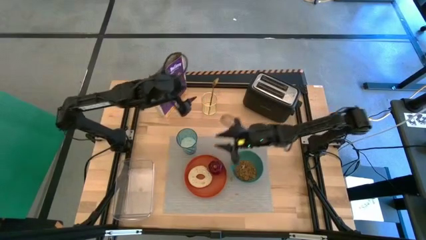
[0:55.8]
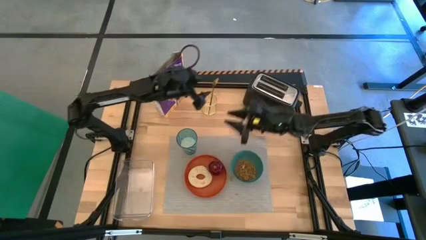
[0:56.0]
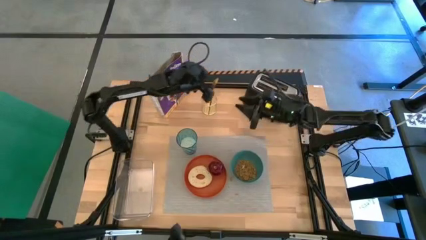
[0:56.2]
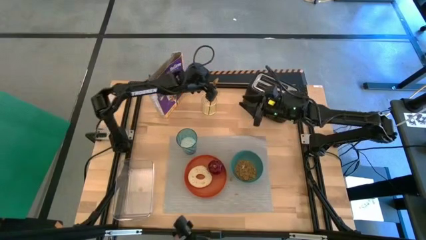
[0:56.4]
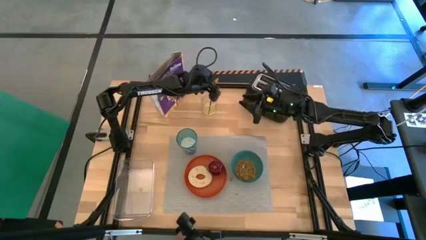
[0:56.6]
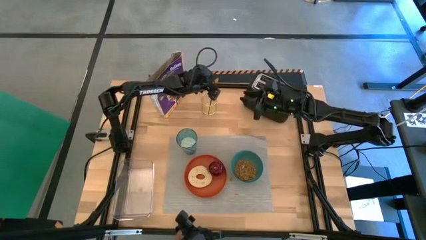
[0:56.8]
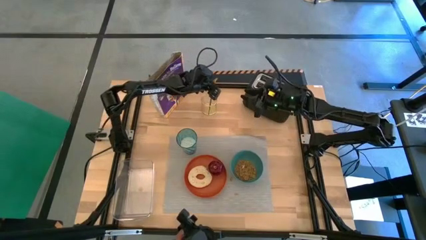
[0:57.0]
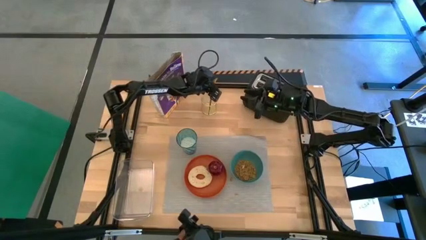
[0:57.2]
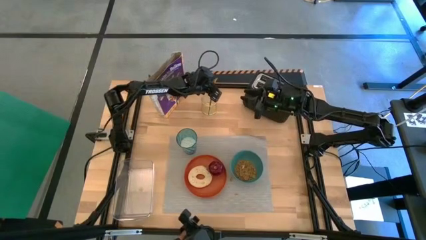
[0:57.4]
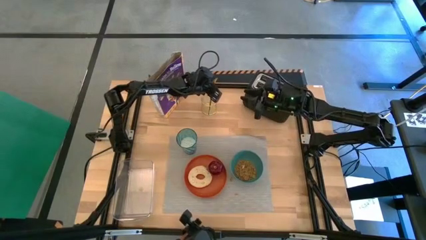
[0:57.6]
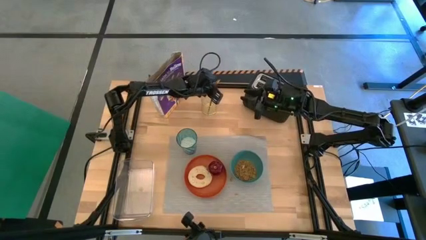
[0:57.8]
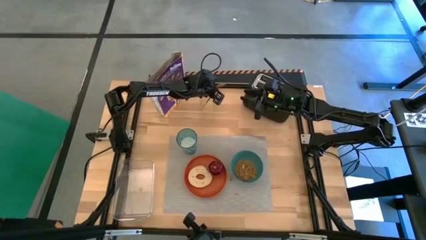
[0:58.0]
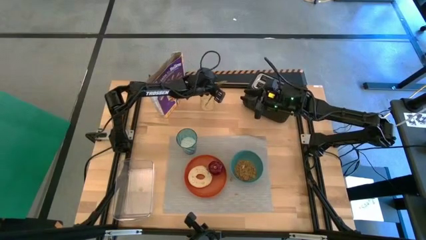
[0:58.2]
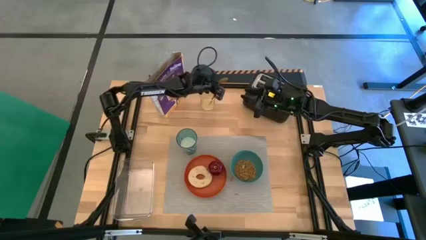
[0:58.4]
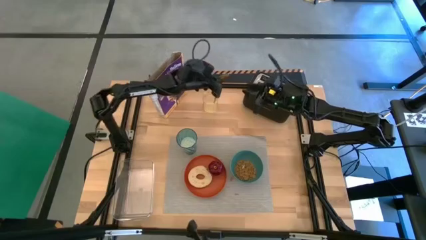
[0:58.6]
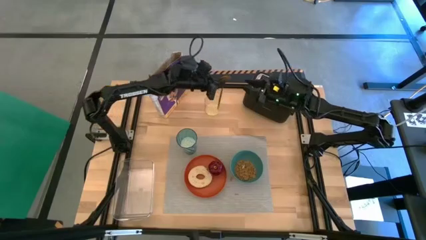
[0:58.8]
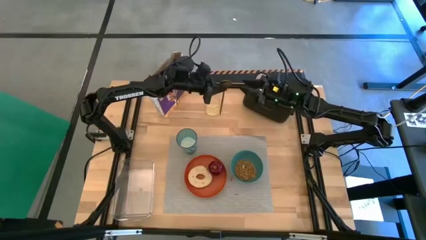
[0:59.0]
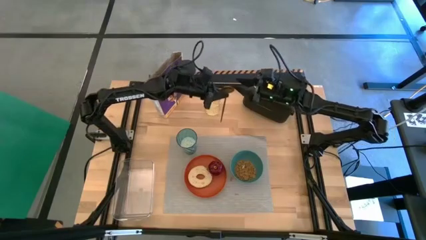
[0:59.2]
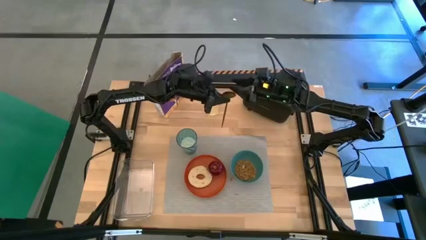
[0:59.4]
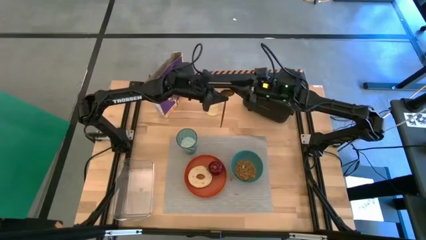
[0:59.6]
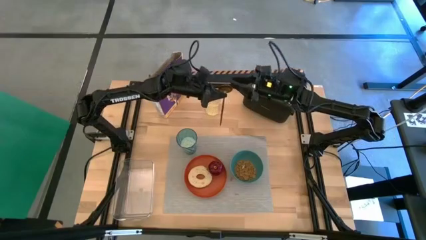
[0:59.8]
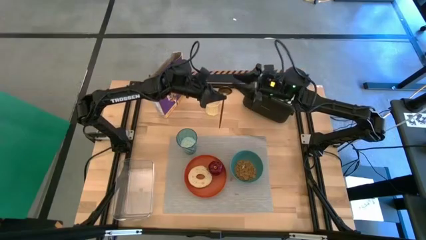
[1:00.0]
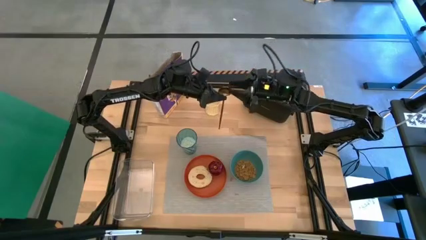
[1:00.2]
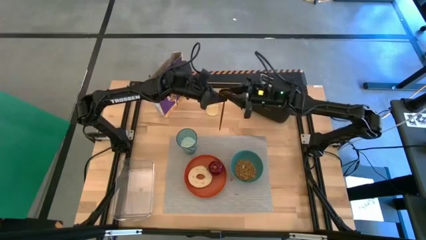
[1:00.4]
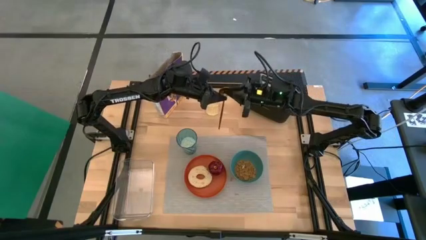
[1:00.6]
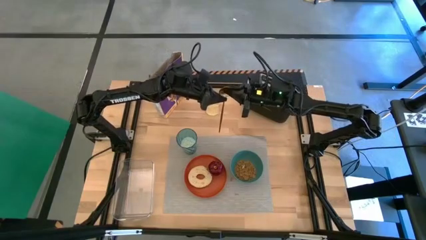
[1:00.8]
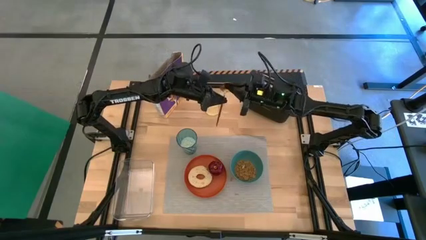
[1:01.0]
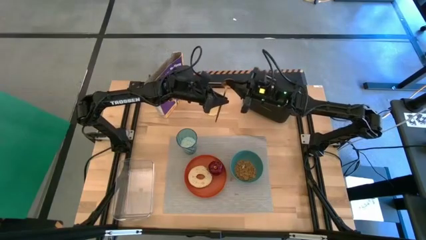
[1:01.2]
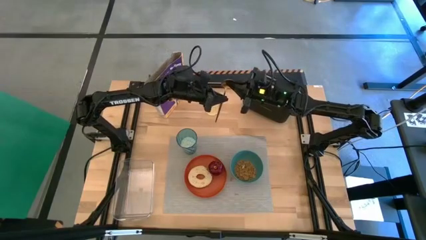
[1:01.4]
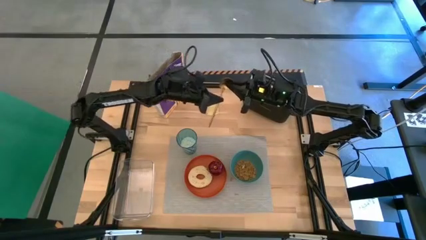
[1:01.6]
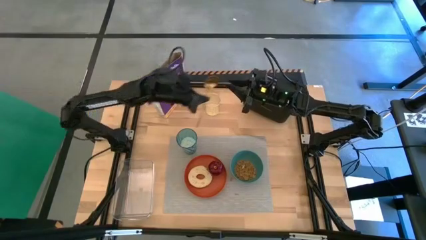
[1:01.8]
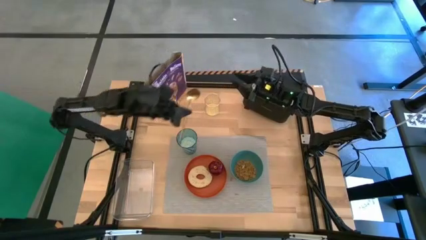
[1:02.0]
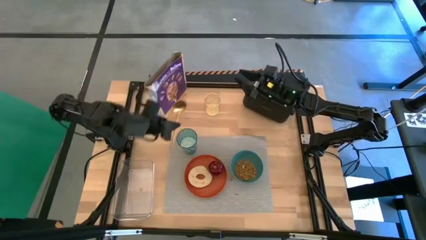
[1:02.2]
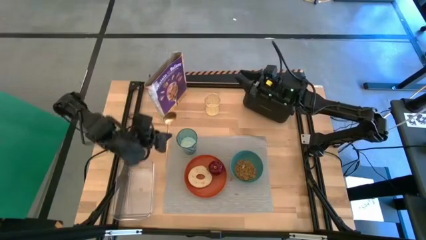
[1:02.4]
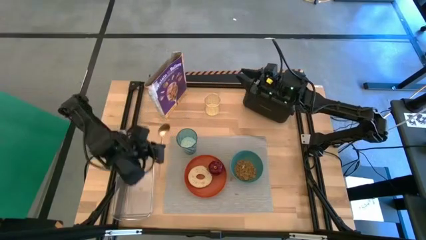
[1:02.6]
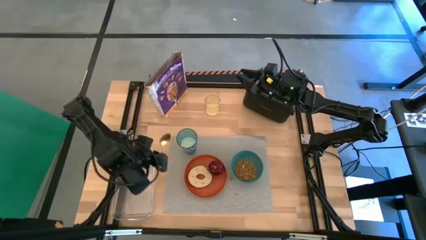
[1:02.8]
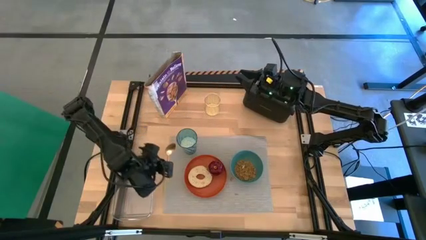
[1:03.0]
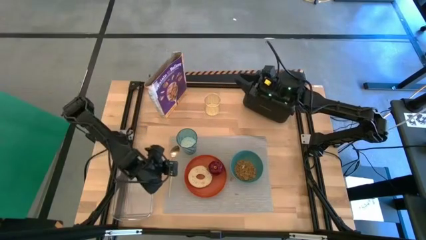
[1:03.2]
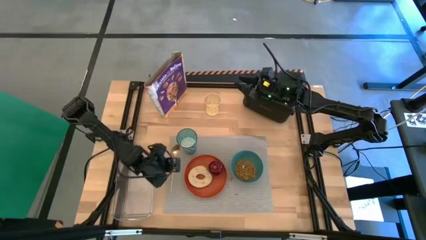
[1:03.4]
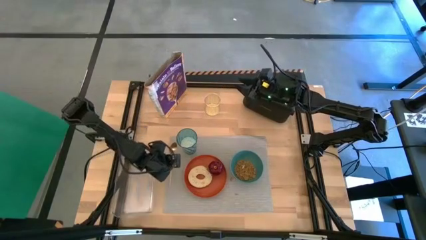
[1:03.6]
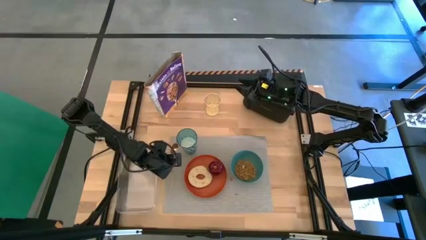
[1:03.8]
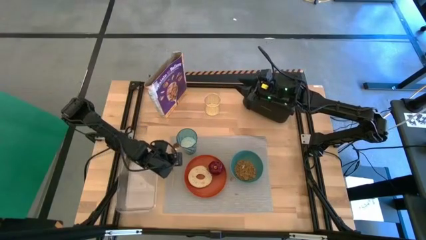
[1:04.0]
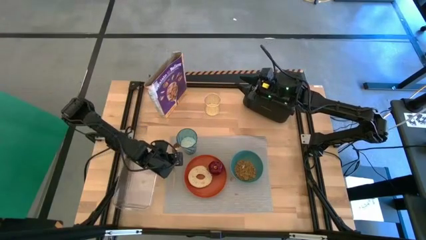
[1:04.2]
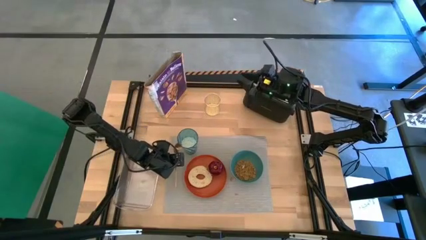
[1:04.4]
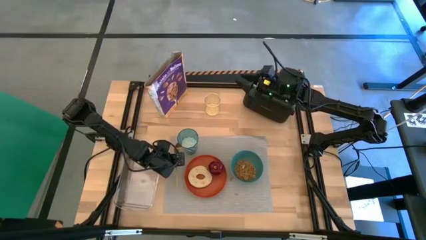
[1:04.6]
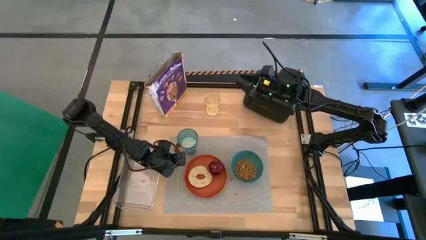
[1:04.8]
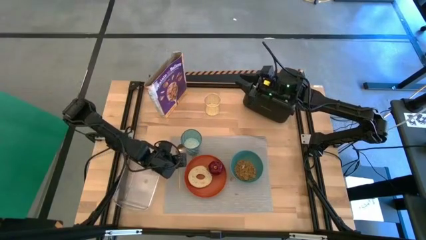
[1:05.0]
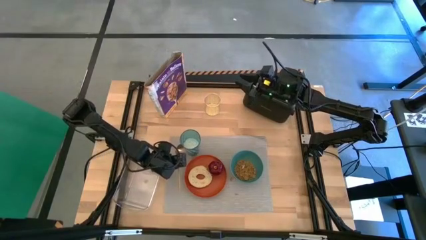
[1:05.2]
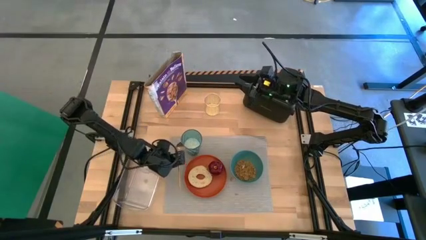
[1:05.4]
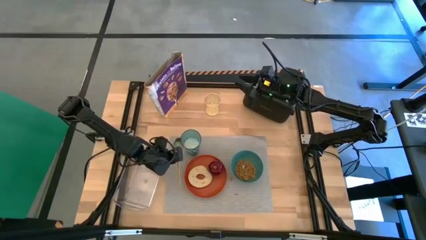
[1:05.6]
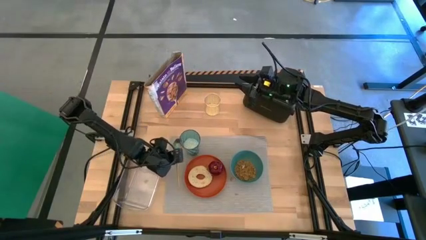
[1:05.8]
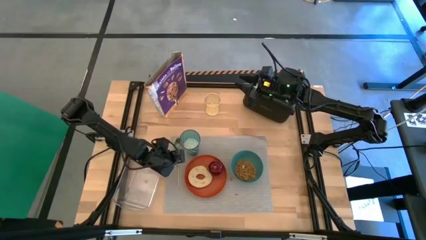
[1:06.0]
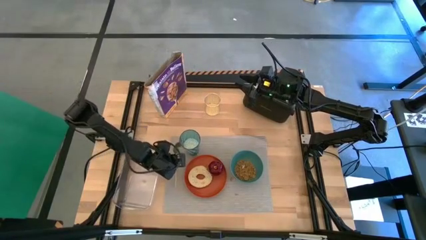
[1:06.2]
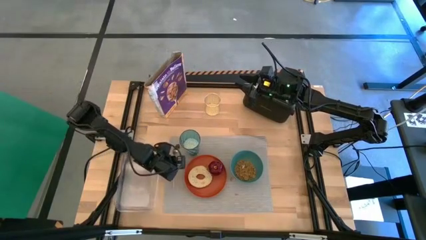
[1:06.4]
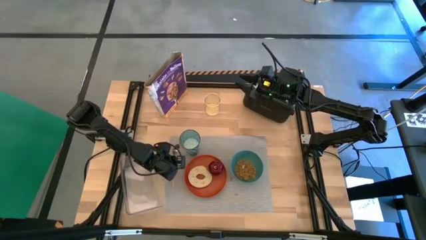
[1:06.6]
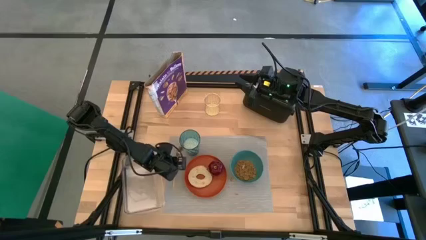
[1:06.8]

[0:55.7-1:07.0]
Task: Arrange a breakfast setting
Put the gold spoon on the left of the gray table mat

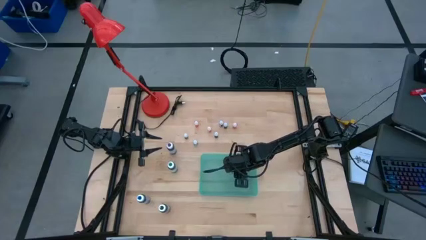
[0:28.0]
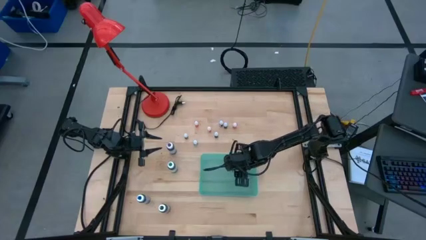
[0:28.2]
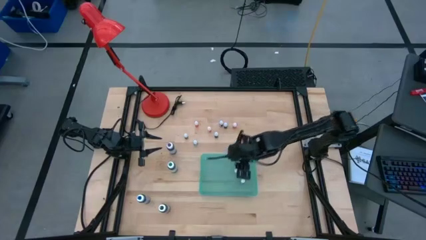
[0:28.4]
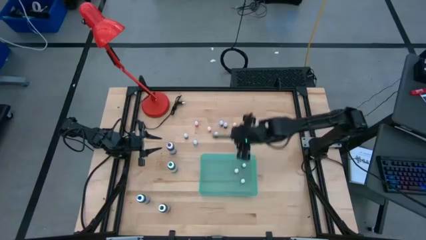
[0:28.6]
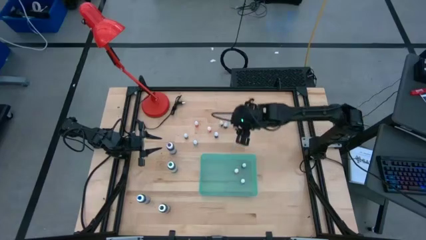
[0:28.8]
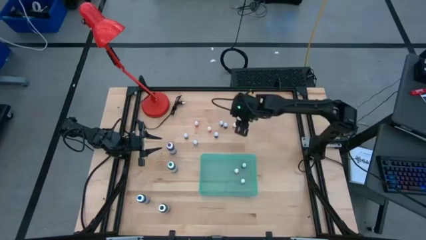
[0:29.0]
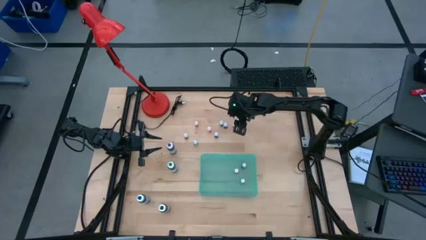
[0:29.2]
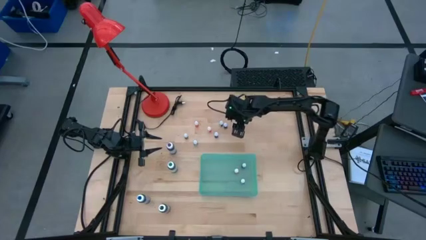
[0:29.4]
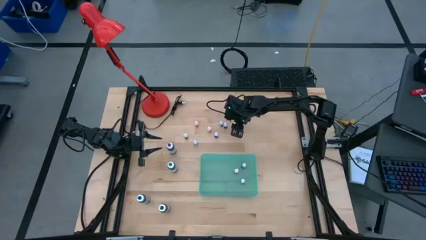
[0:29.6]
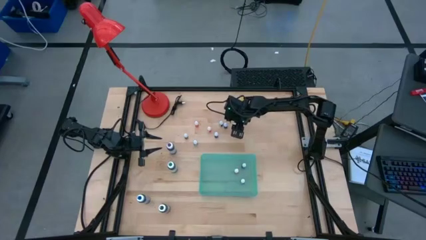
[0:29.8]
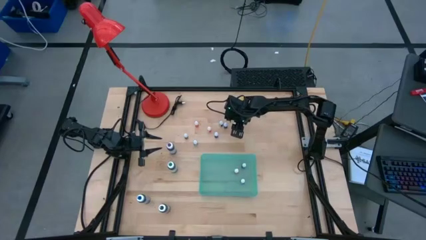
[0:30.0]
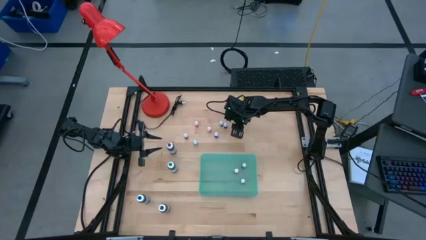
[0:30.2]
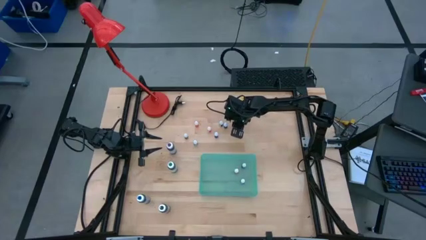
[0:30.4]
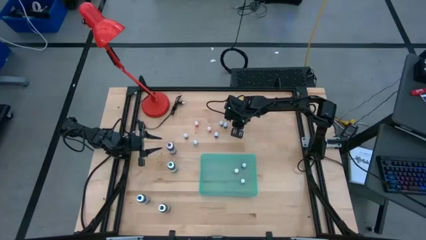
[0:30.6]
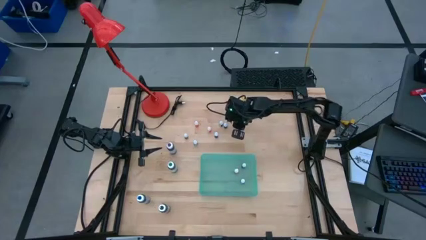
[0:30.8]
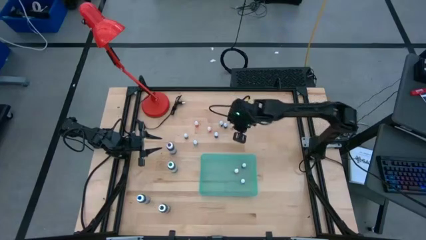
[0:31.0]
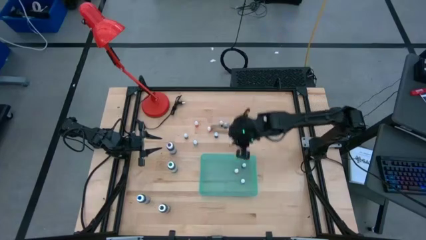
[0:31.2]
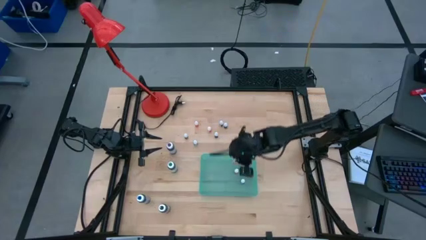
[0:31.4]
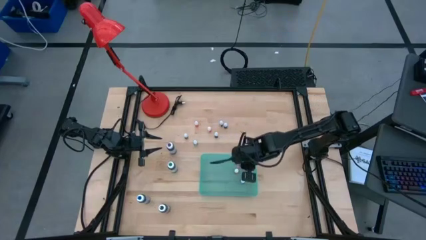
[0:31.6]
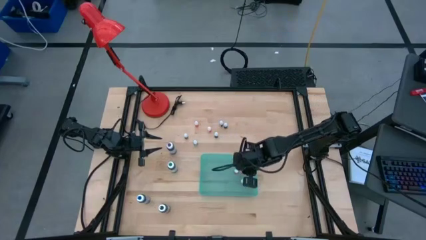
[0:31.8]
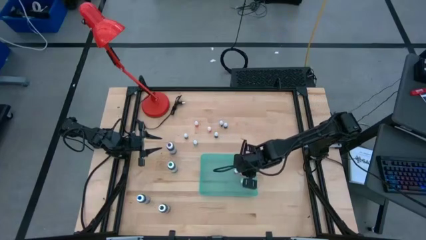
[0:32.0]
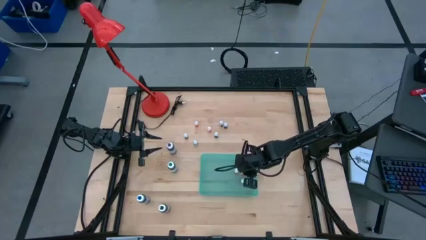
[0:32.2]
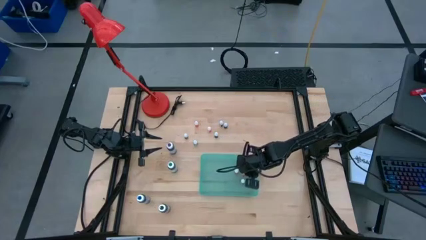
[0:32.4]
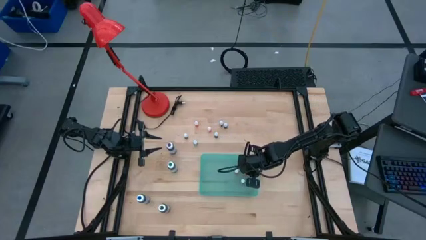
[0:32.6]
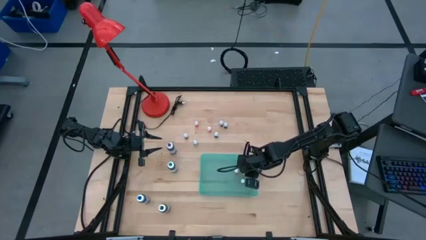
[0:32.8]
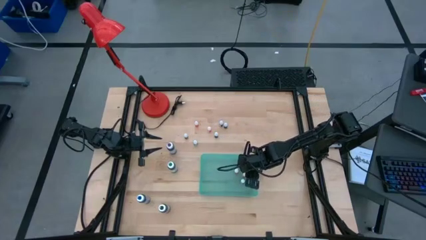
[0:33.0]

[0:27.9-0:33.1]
Task: Pick & Place food coloring
Put the small orange food coloring bottle into the green bin
